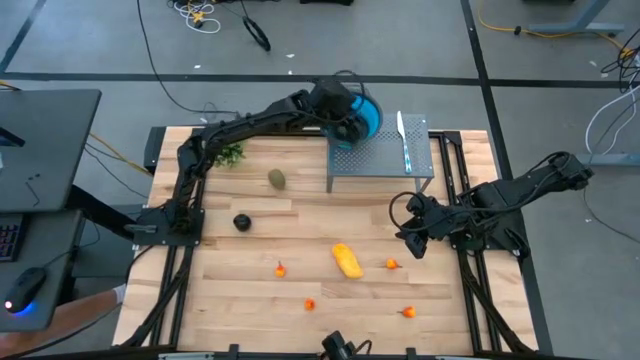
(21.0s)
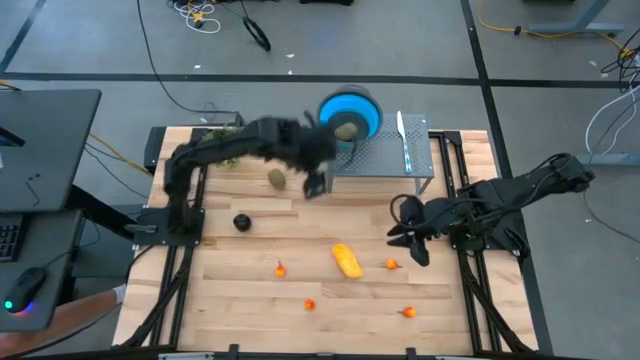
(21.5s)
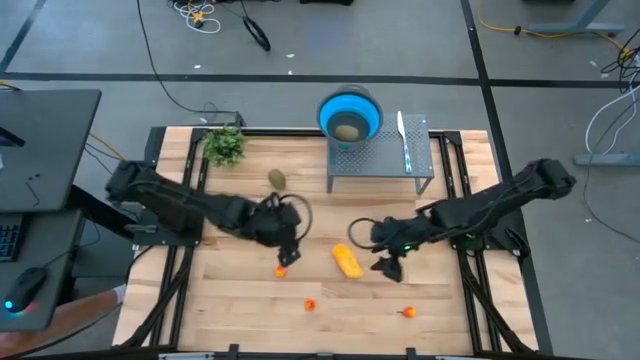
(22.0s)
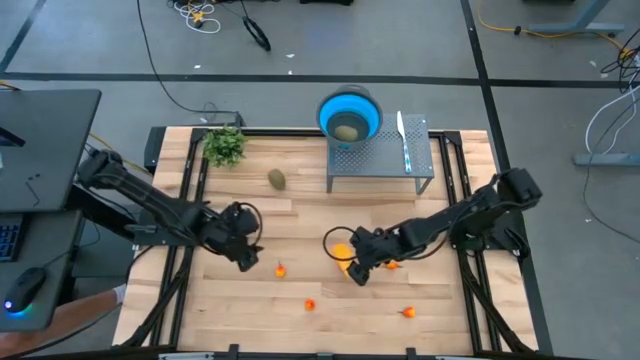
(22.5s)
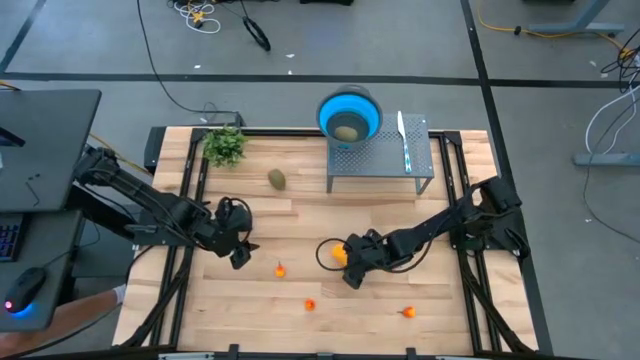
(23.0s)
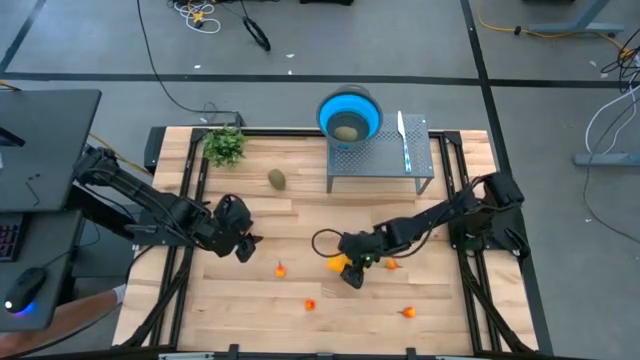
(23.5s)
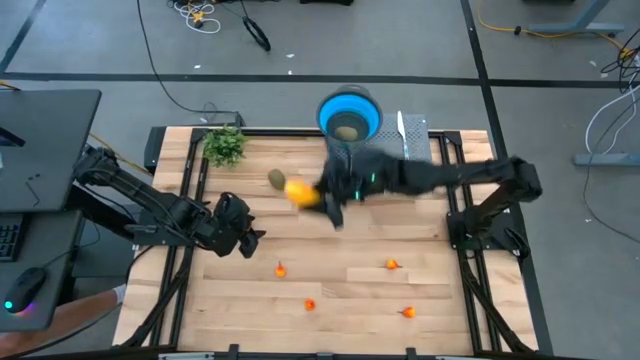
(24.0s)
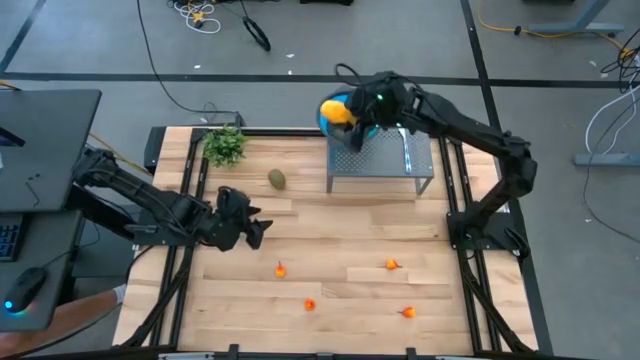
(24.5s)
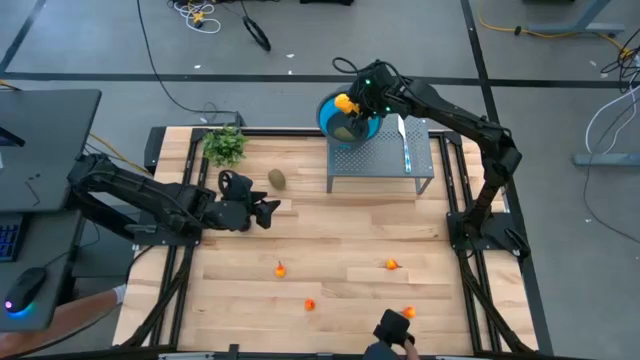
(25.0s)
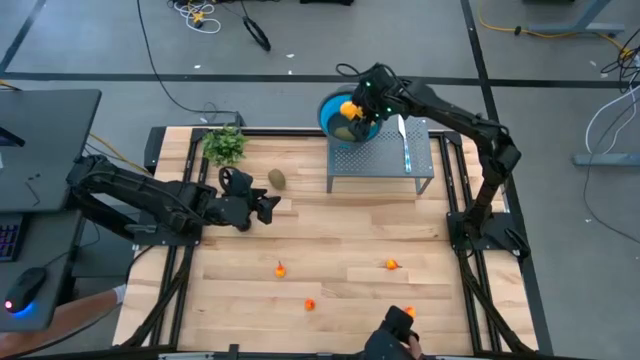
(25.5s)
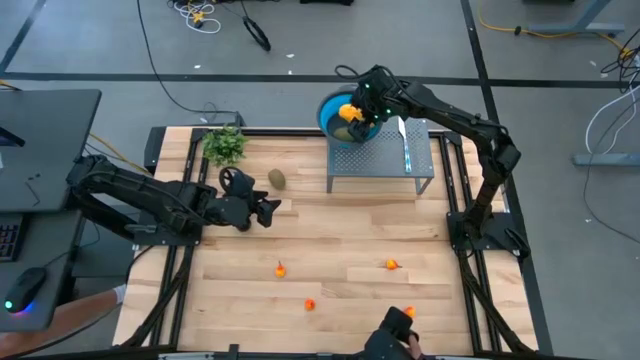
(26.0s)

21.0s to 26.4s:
Task: Pick & Place Fruit
Put the mango into the strainer bowl

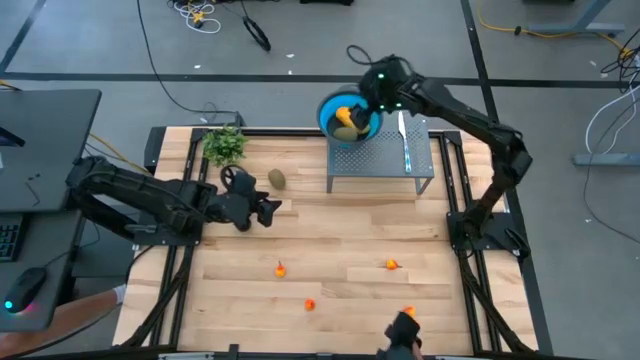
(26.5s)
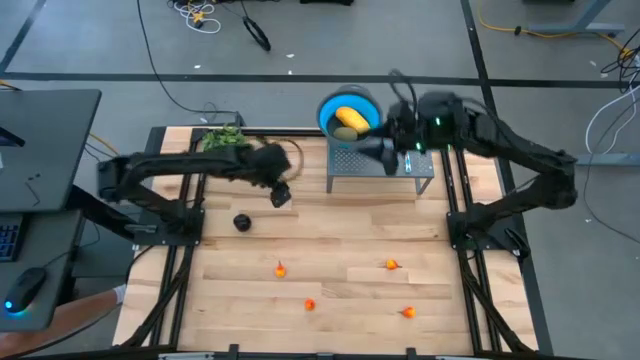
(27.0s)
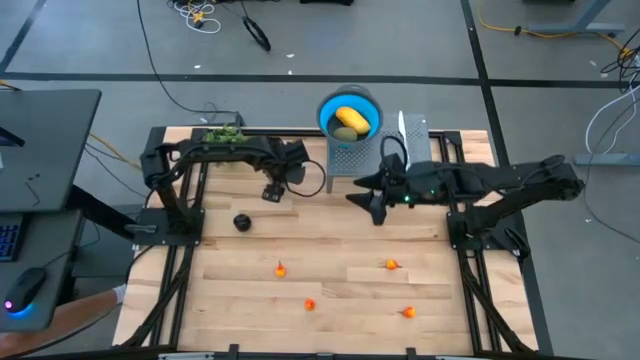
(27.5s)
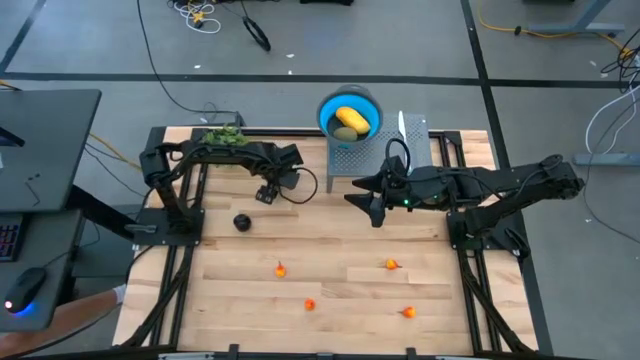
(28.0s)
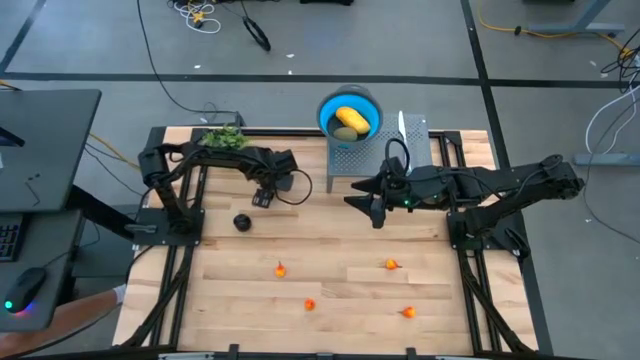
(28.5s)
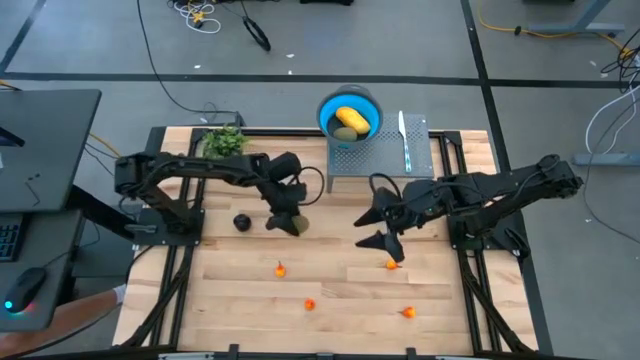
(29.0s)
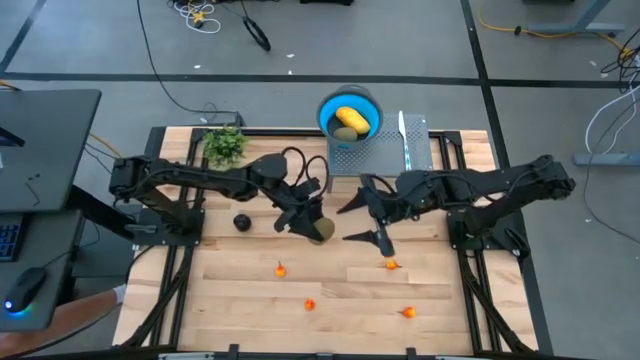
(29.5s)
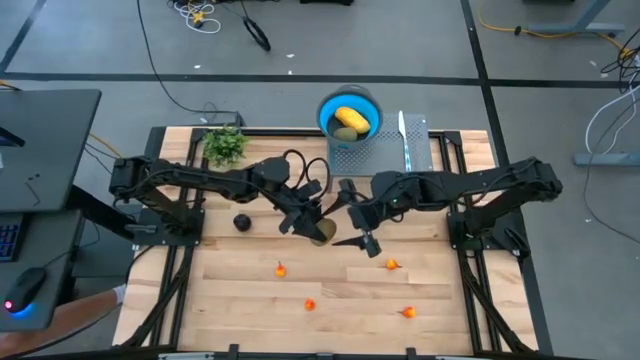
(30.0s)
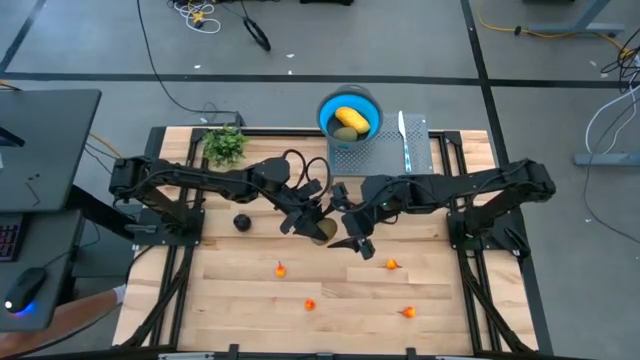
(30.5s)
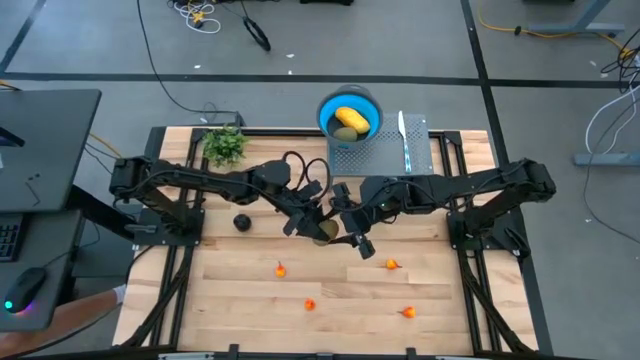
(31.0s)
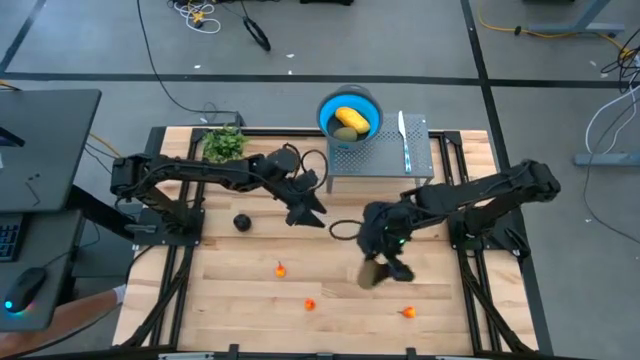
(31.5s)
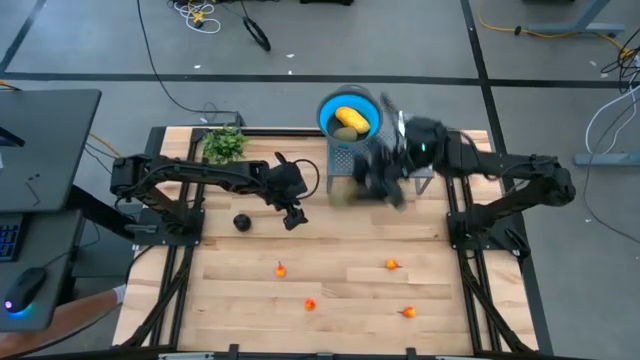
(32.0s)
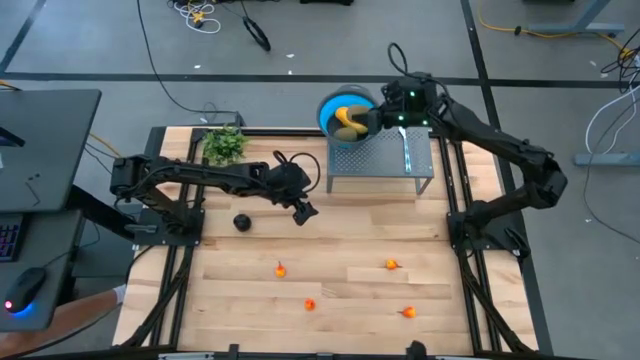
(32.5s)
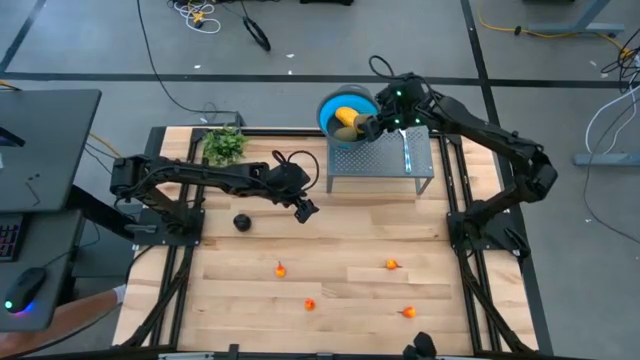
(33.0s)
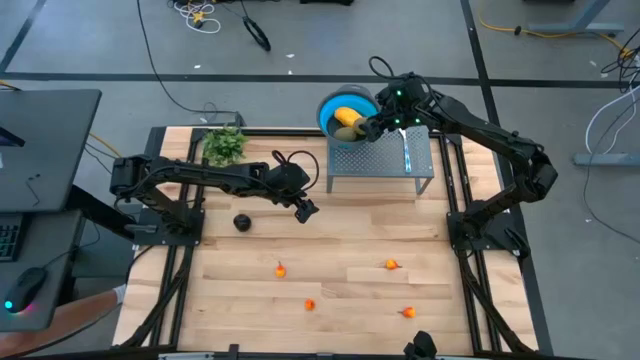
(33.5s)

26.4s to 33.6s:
Put the kiwi into the strainer bowl

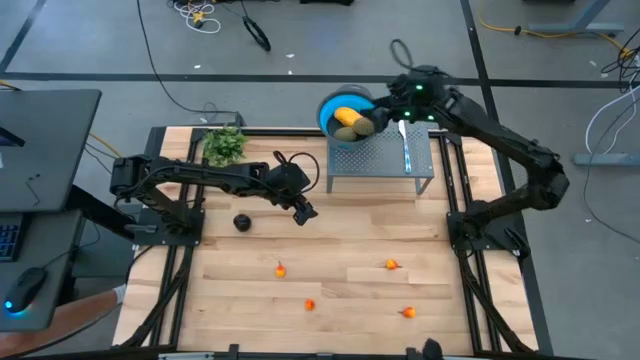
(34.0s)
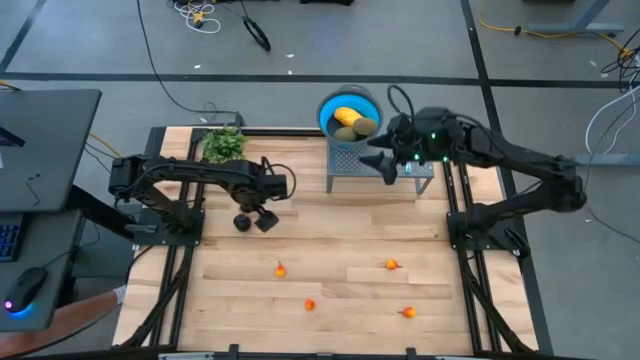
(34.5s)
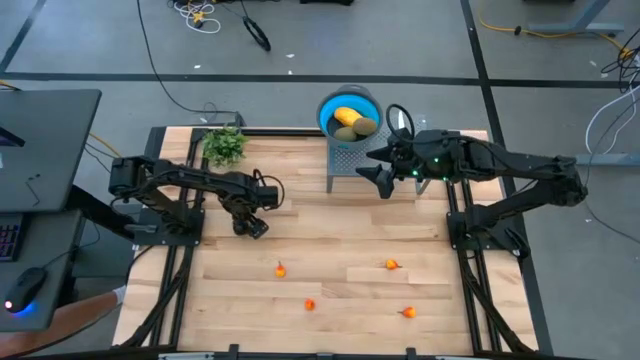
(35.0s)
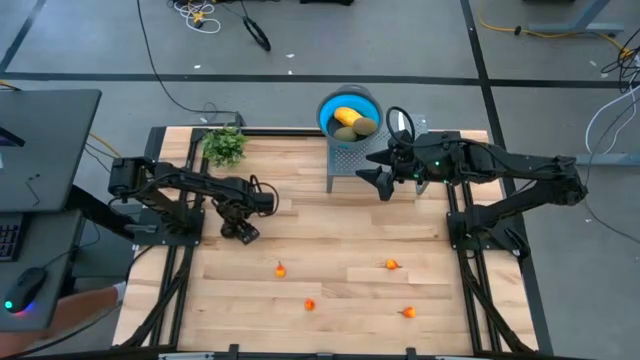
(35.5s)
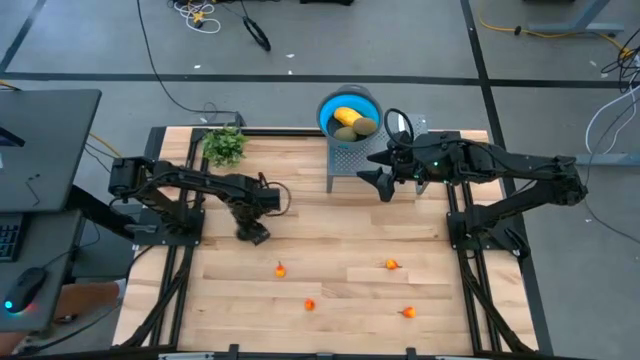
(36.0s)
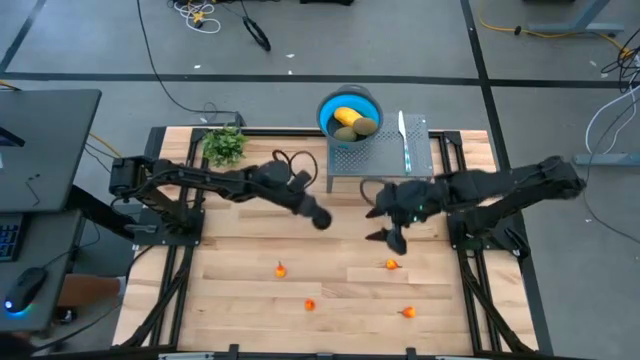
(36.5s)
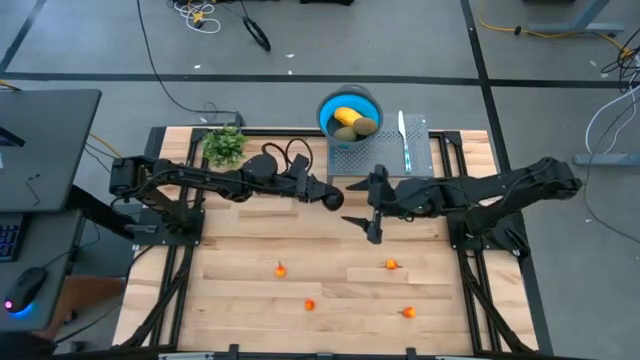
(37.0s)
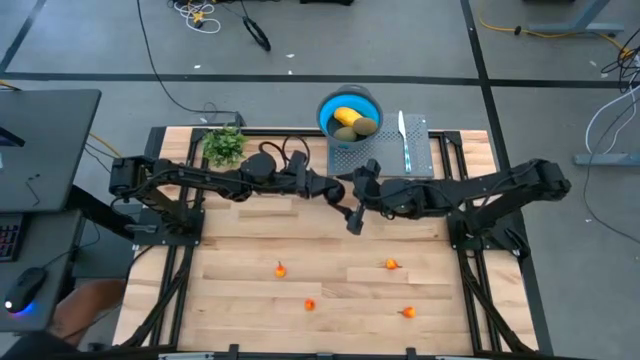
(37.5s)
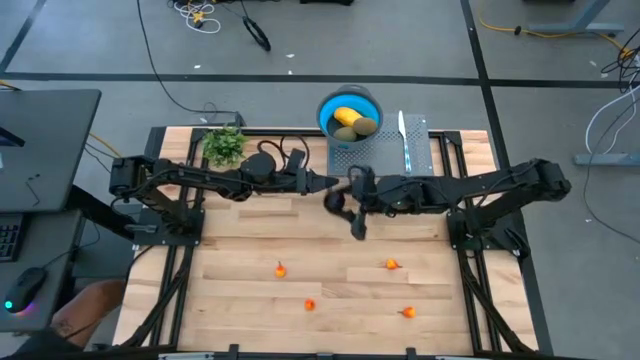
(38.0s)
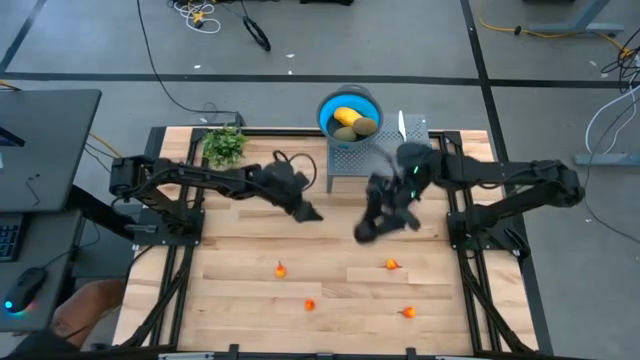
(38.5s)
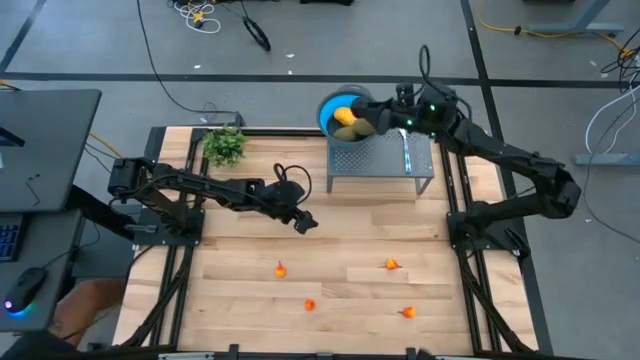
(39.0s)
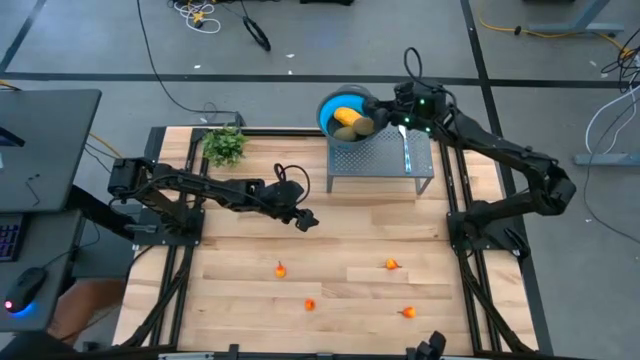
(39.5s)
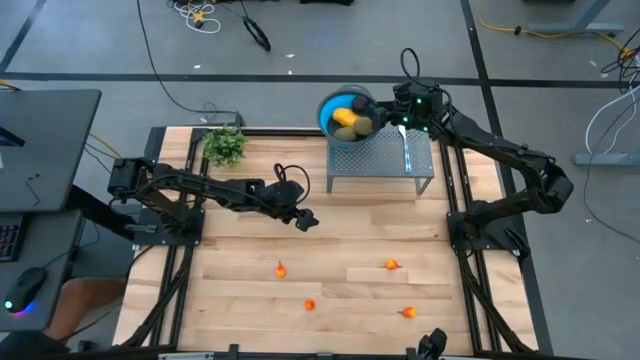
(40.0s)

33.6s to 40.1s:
Put the plum into the strainer bowl

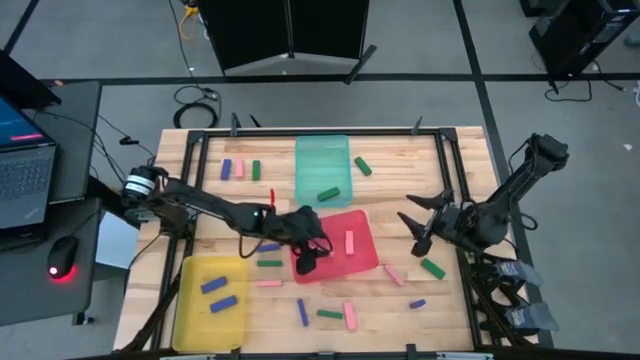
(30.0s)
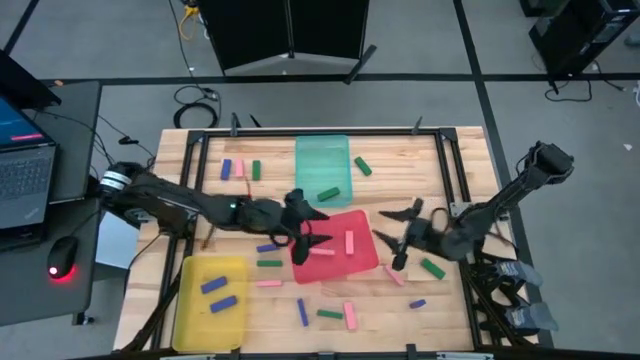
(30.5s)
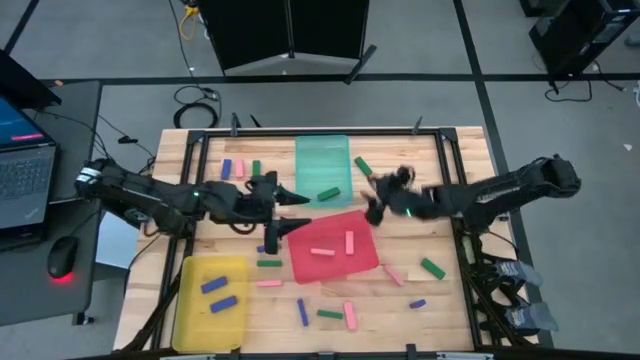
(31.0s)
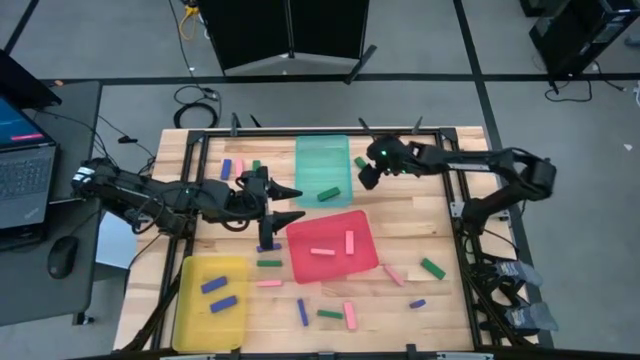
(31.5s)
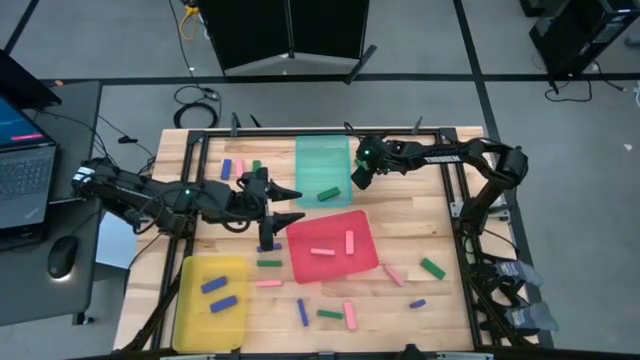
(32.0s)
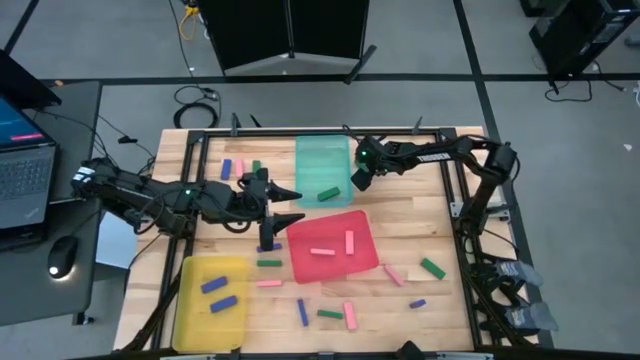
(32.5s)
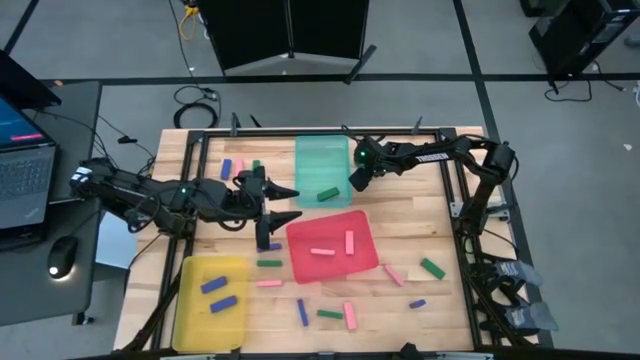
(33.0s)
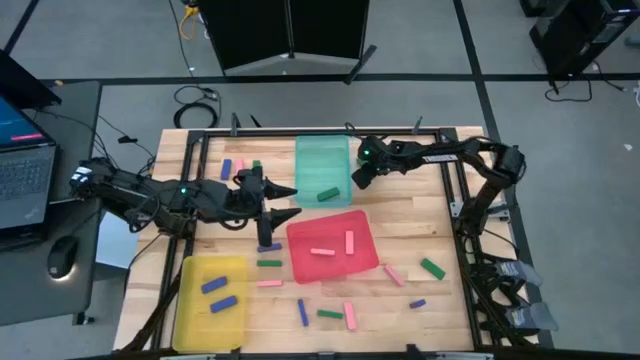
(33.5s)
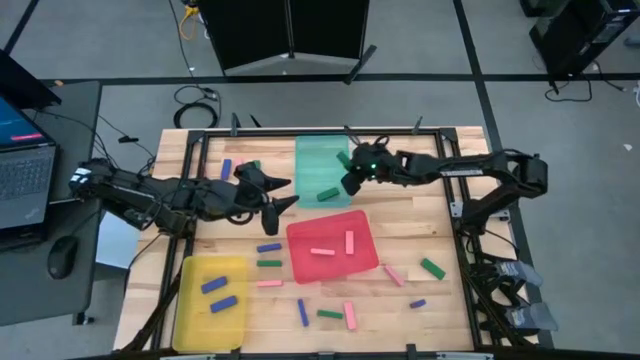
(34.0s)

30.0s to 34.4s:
Task: Sort blocks
Put the green block into the green bin
